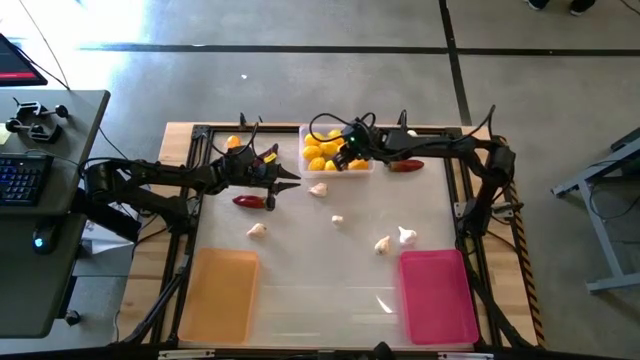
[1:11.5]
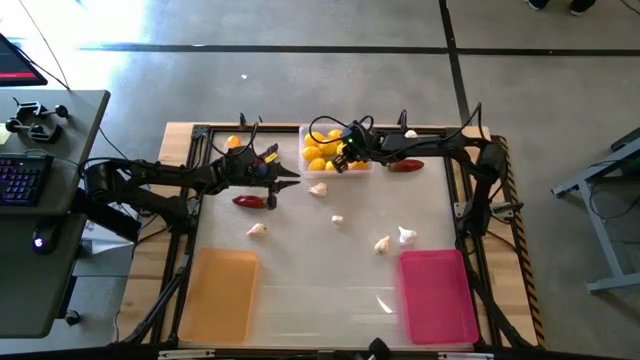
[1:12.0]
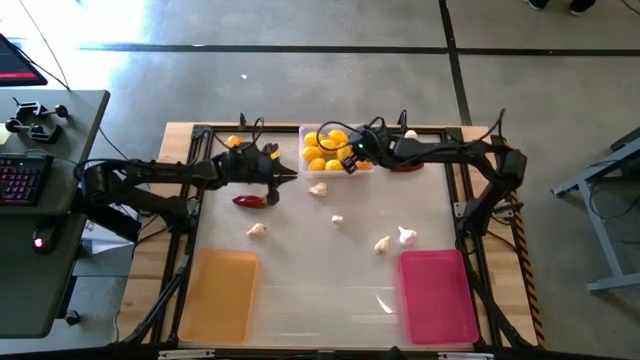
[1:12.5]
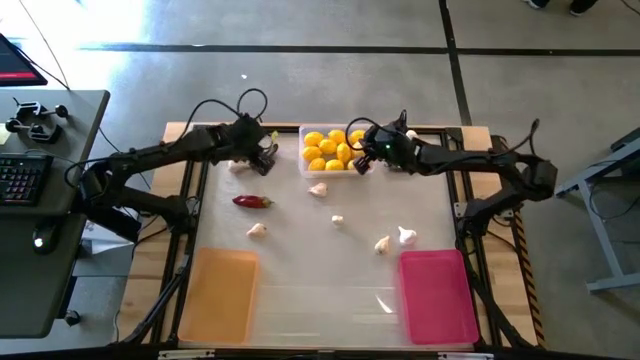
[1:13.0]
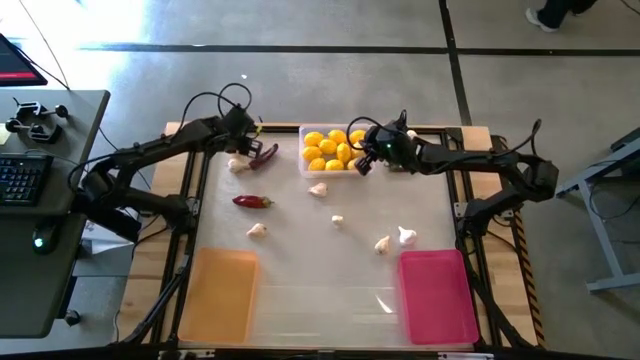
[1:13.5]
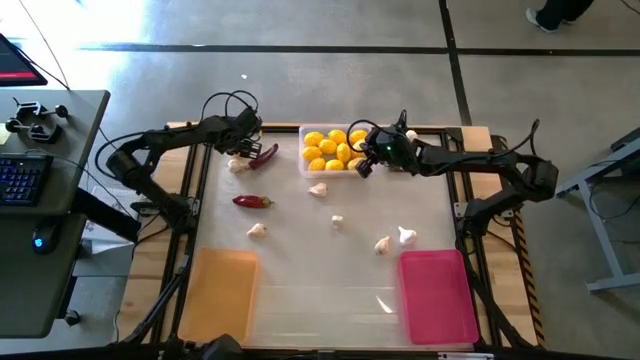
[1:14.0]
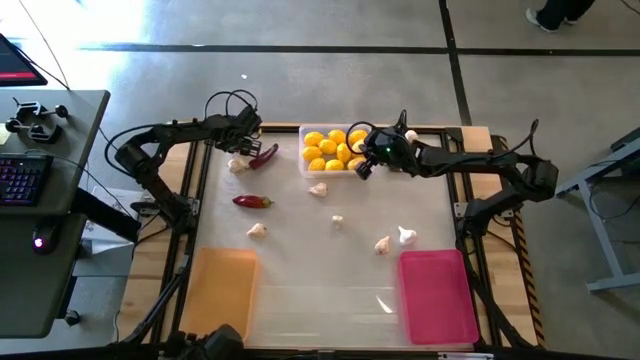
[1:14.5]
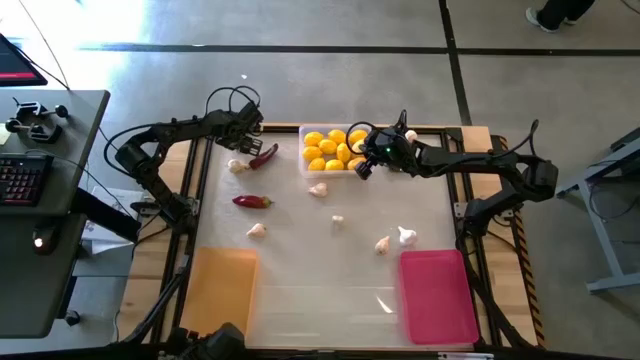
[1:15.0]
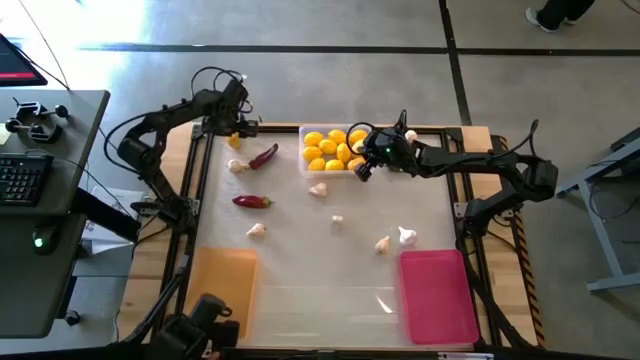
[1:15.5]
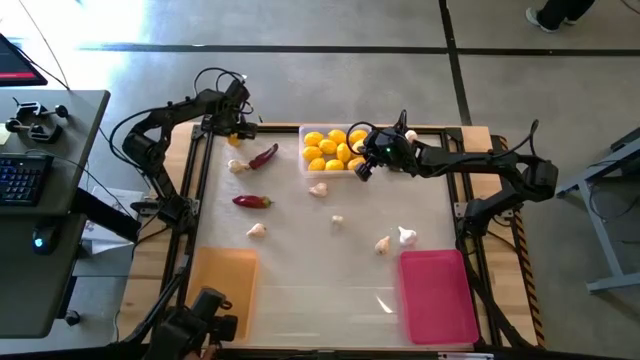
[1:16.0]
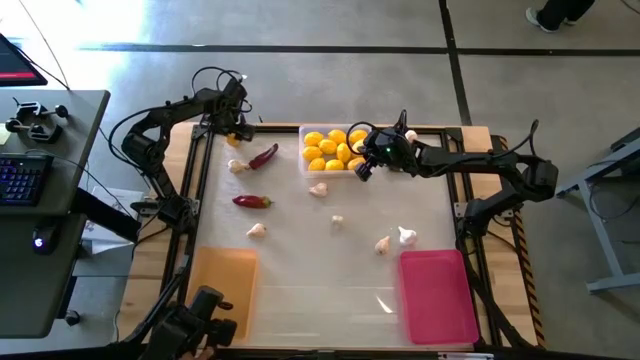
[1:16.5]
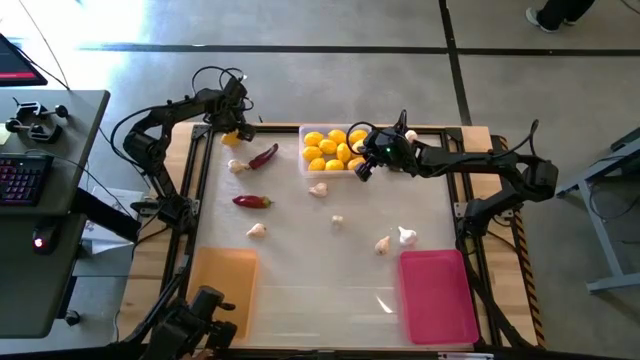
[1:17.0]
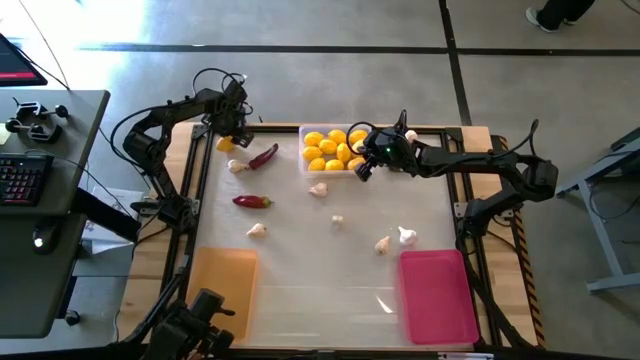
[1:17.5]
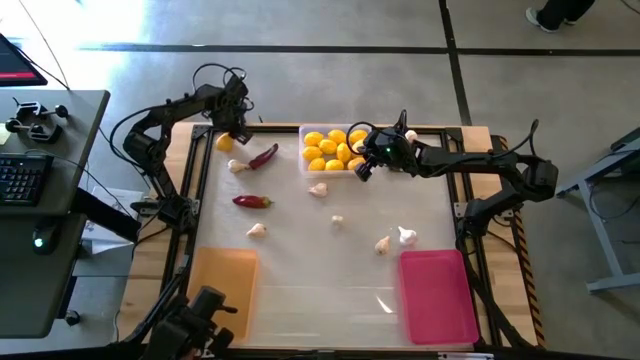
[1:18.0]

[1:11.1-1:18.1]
Task: Sort produce into baskets
Put the lemon into the transparent bin

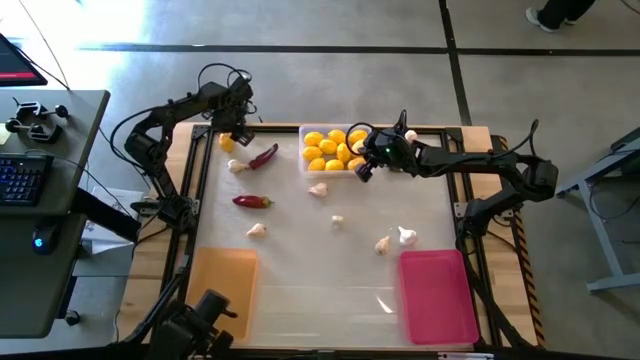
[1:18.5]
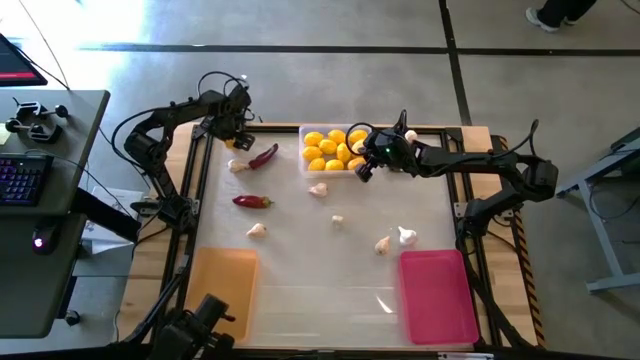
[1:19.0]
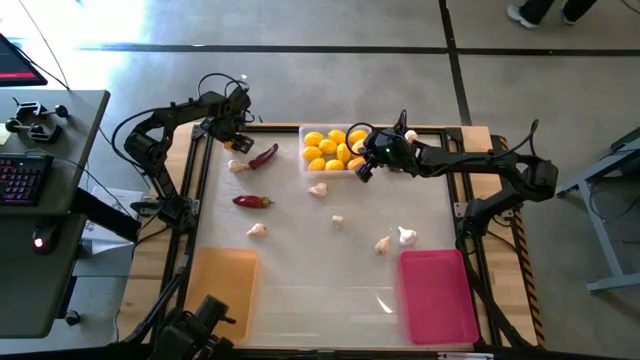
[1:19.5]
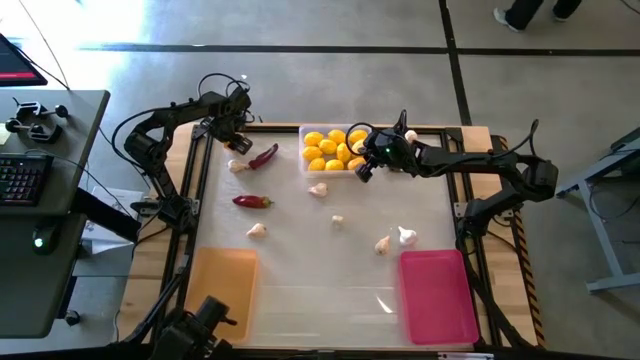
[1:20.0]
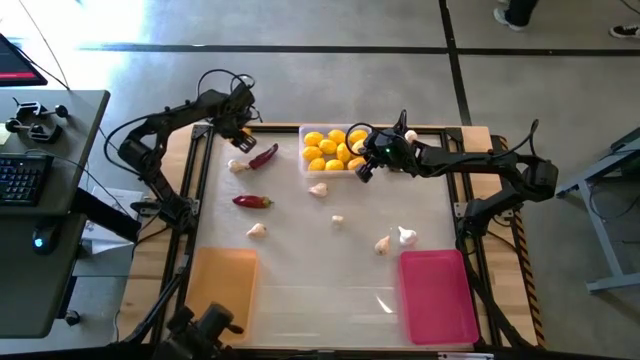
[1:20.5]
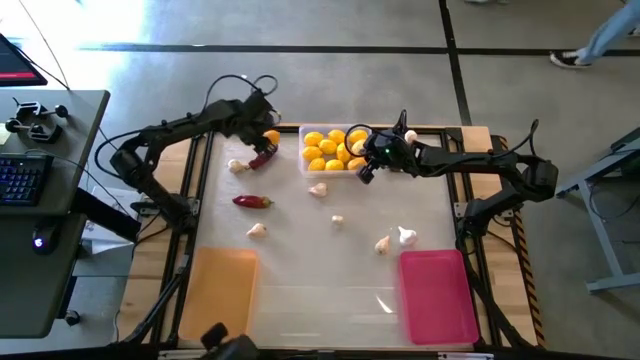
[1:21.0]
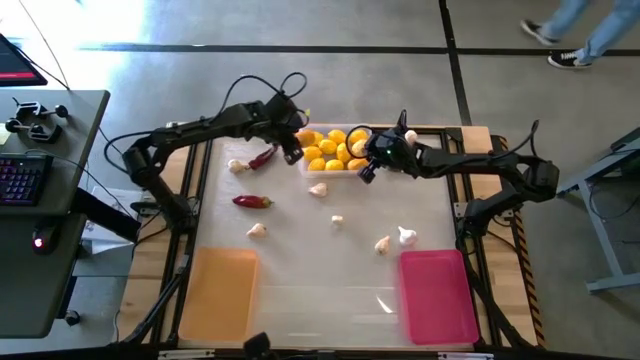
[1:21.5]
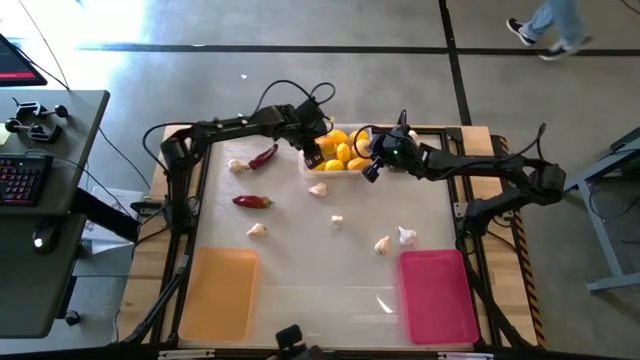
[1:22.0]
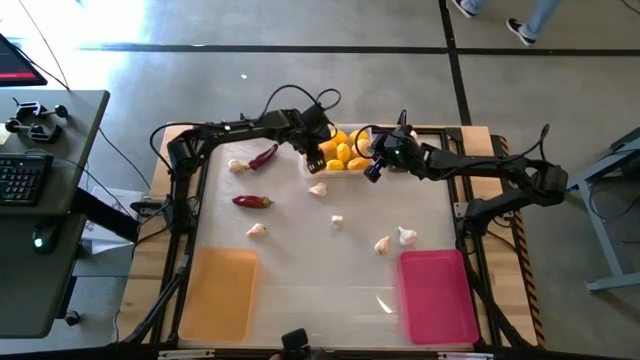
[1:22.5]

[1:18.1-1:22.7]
Put the lemon into the transparent bin

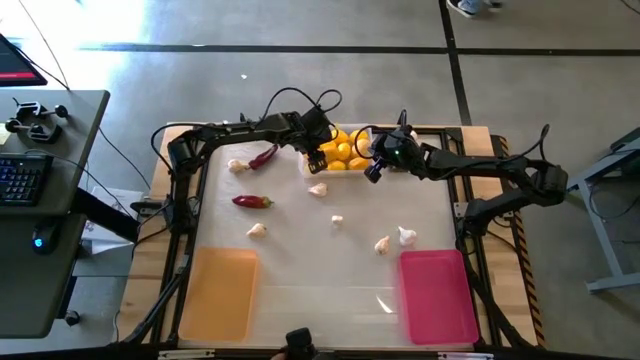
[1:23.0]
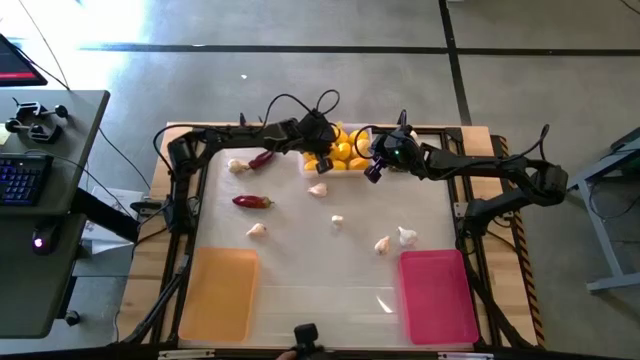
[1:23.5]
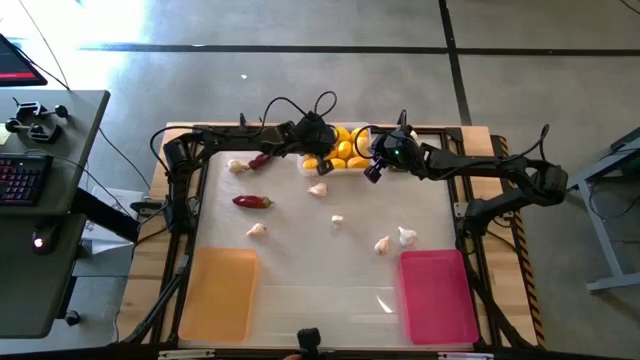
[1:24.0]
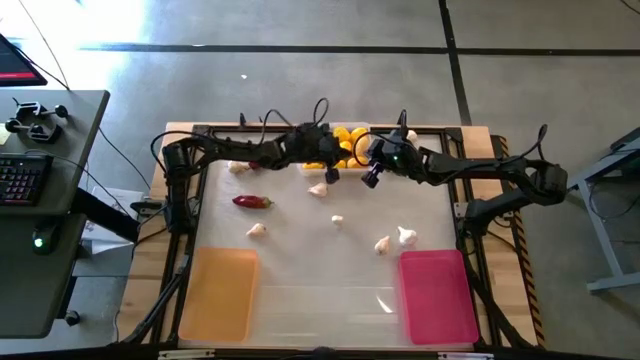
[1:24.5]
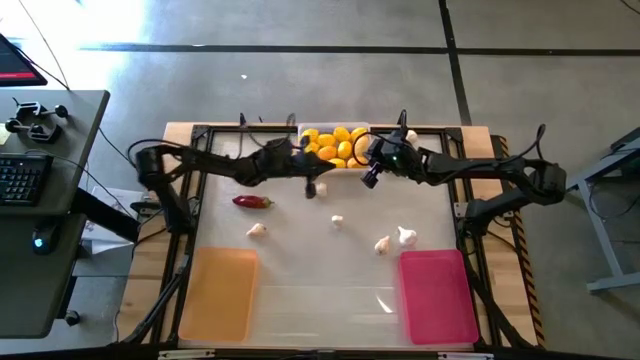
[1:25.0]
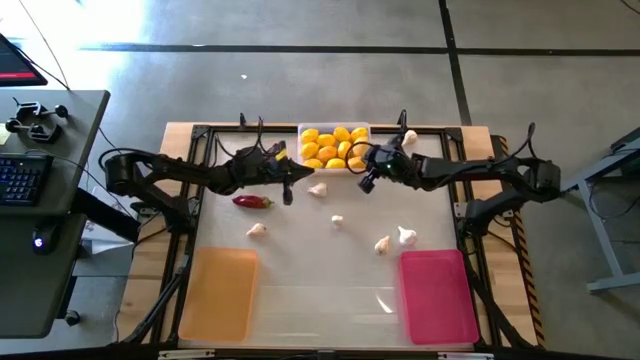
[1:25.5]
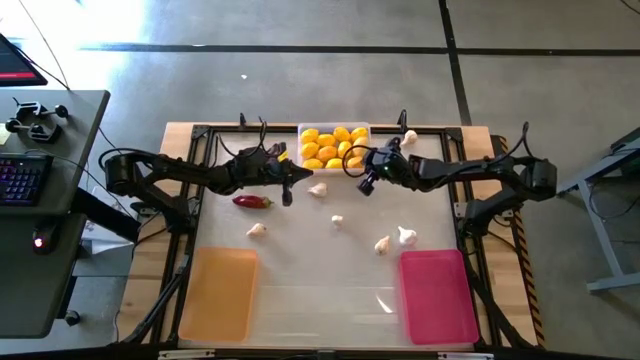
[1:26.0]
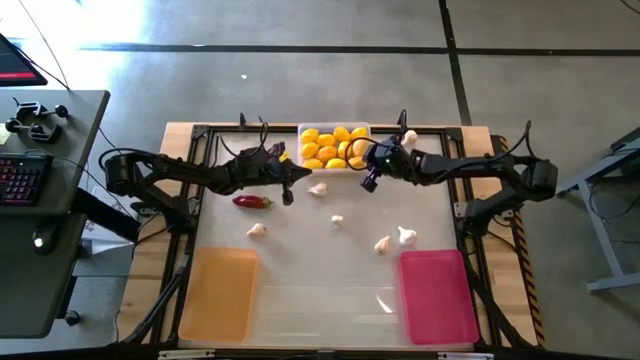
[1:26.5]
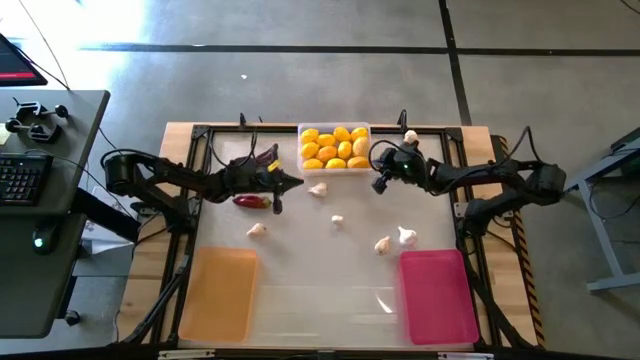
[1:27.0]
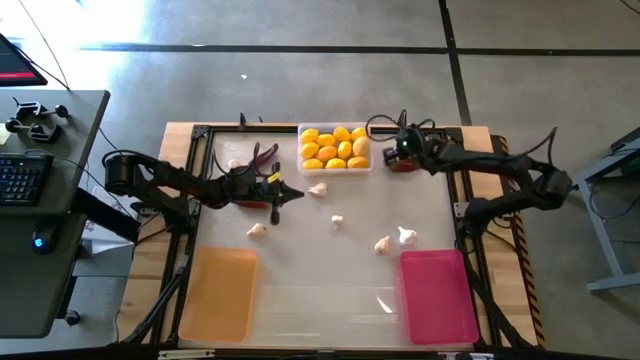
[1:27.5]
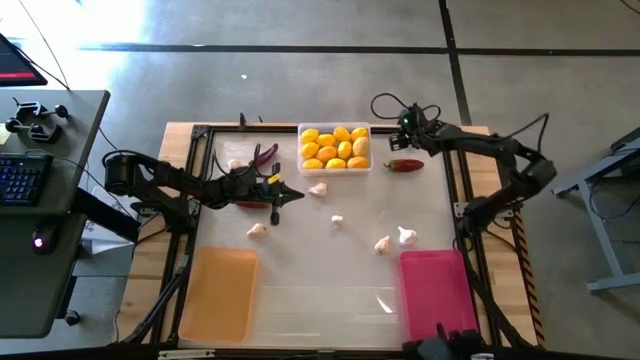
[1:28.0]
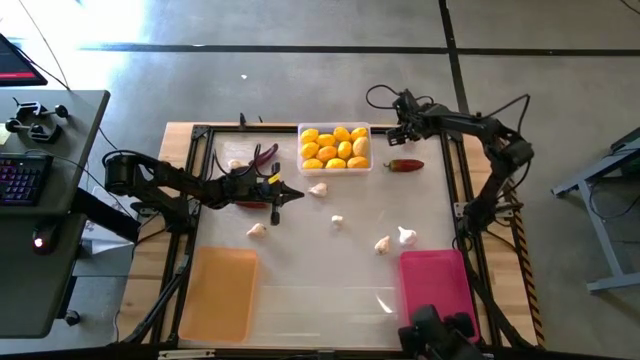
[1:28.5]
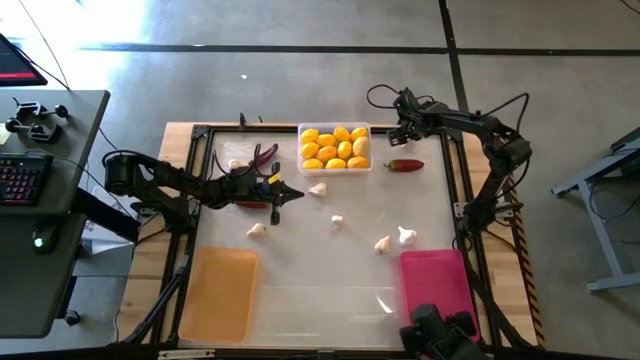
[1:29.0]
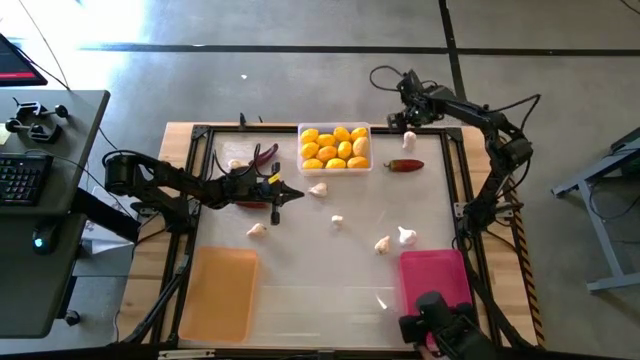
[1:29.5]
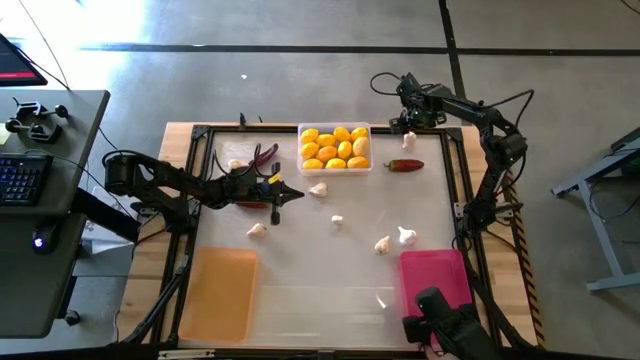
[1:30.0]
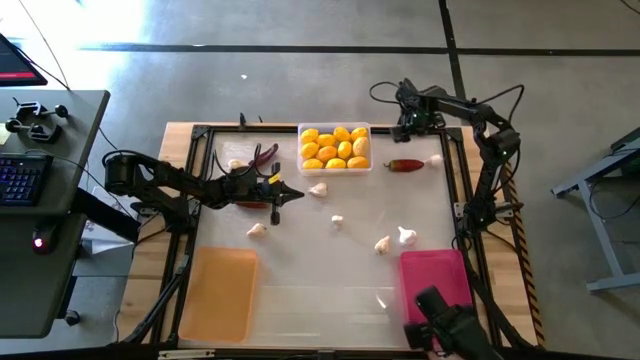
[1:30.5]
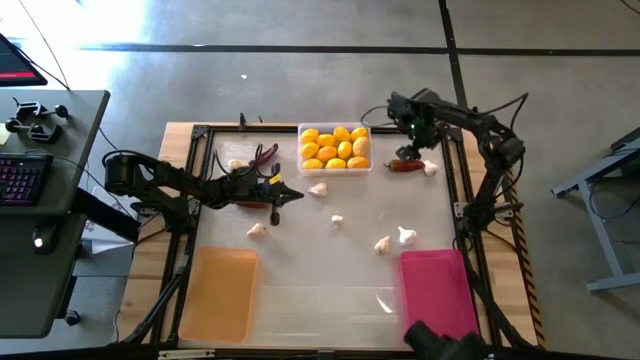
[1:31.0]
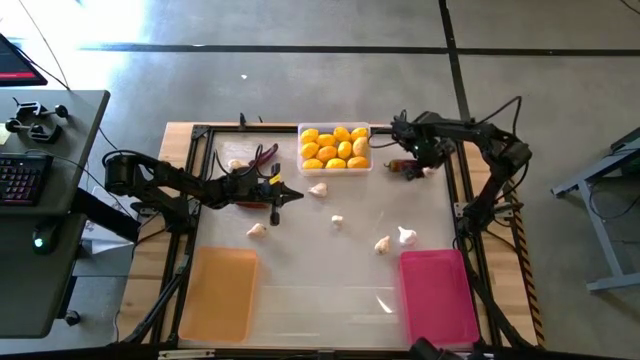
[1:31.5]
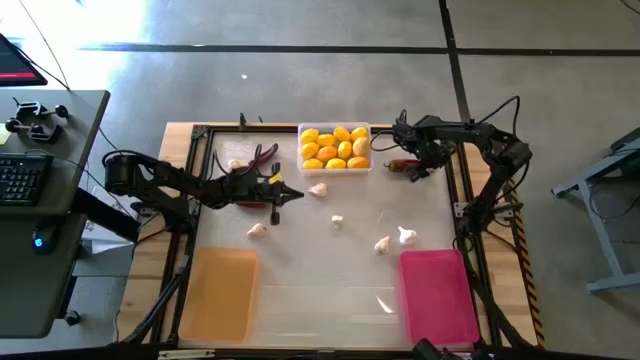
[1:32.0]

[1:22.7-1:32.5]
Put the top right garlic into the pink bin

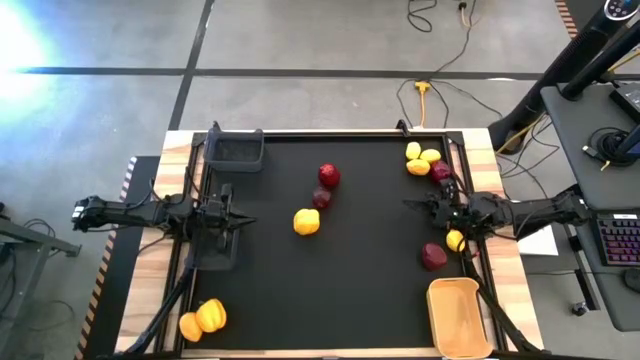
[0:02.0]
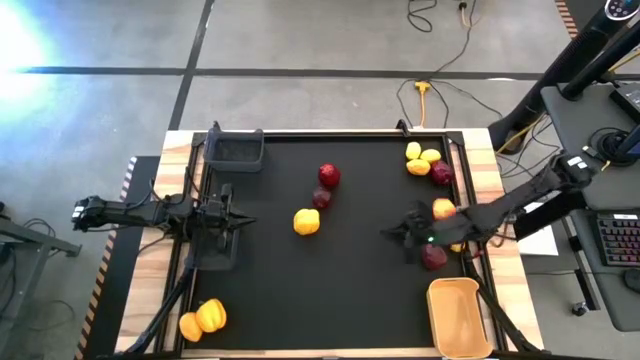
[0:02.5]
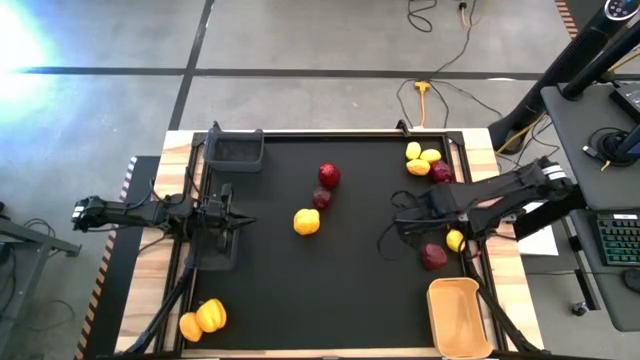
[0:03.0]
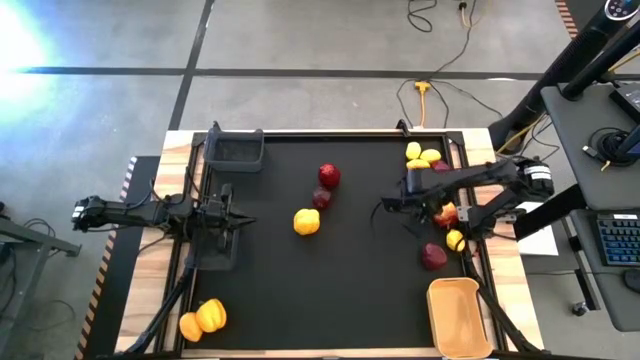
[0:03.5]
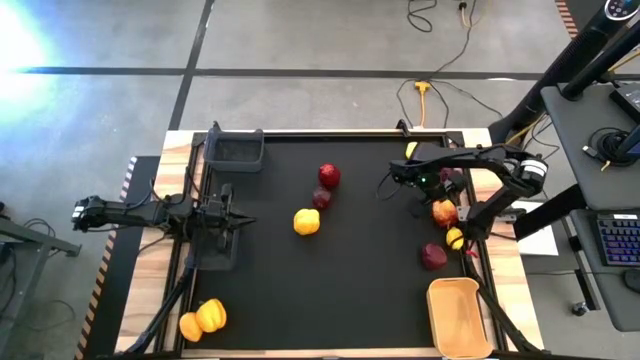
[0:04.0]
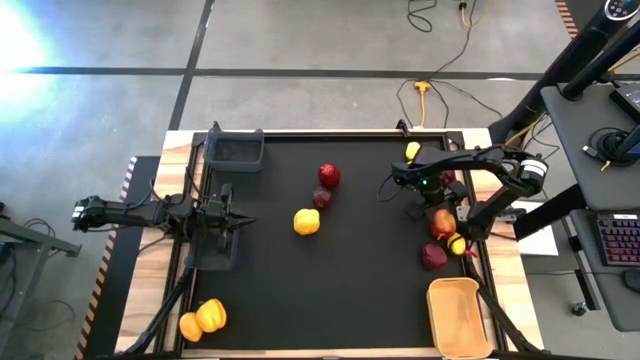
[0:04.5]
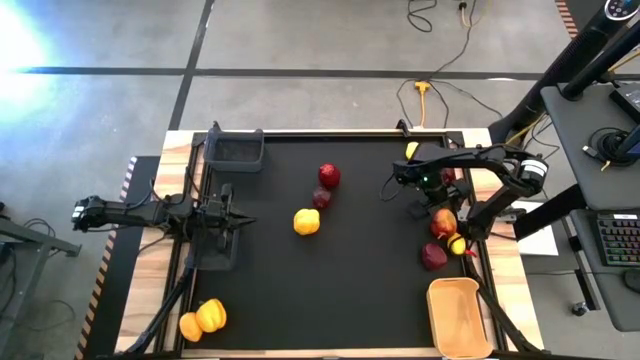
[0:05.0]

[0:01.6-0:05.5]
Task: Sort produce into baskets
Put the apple into the yellow bin
